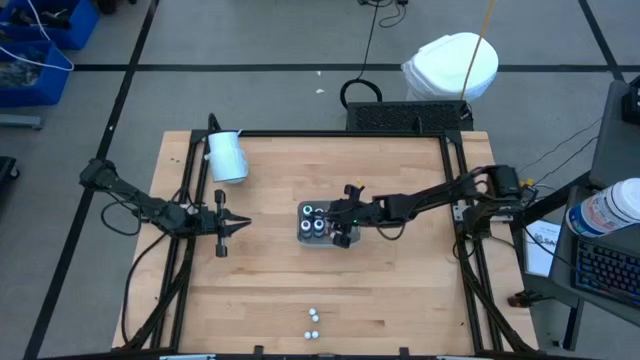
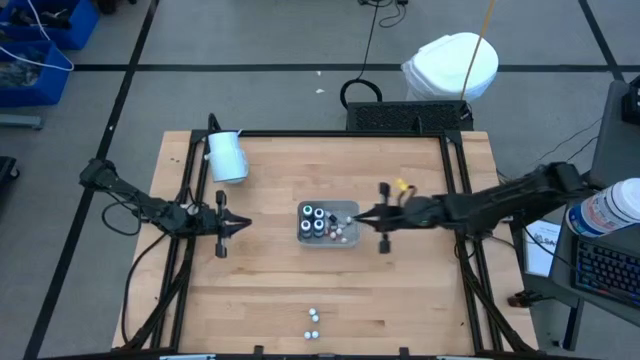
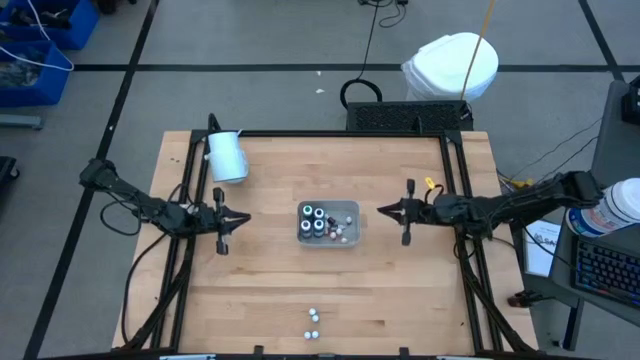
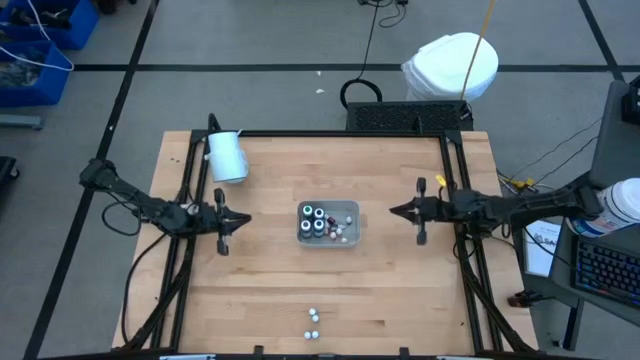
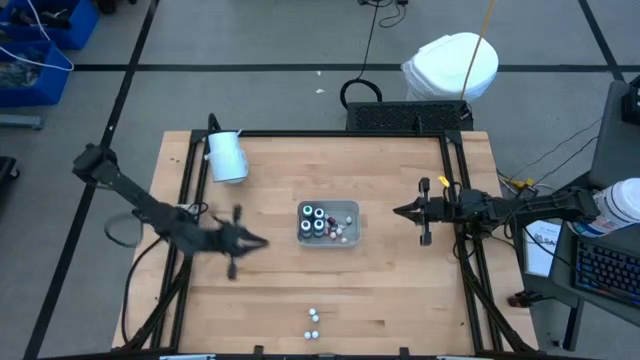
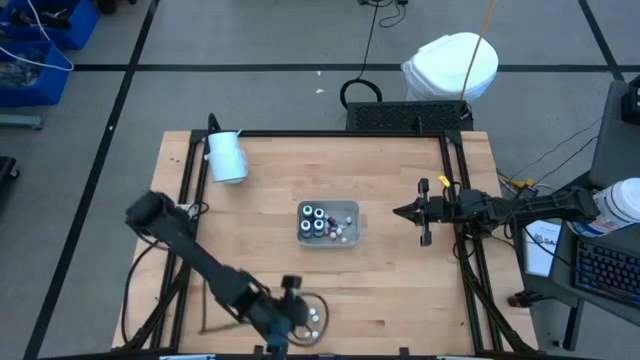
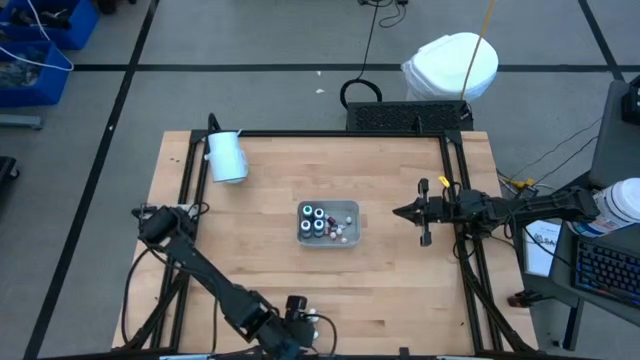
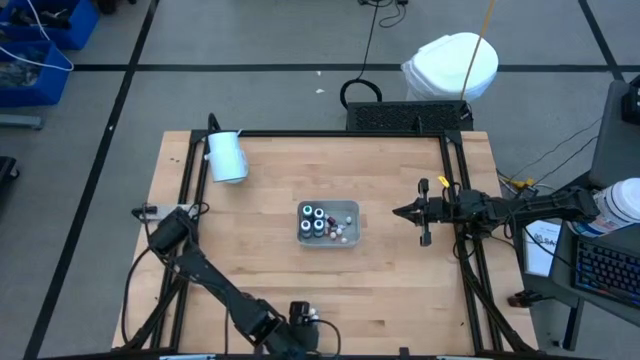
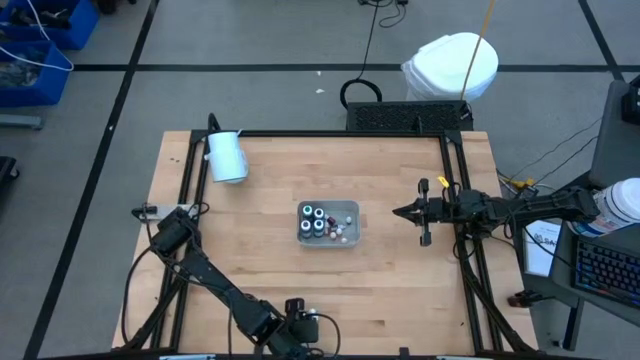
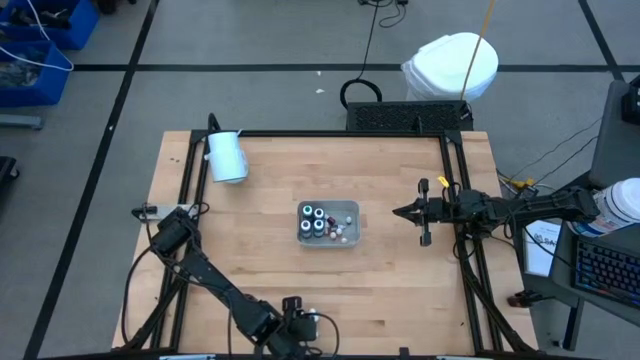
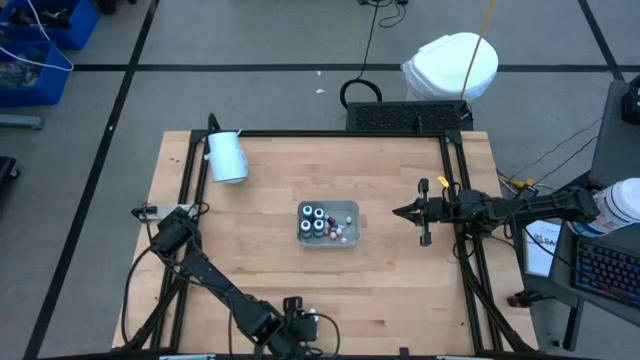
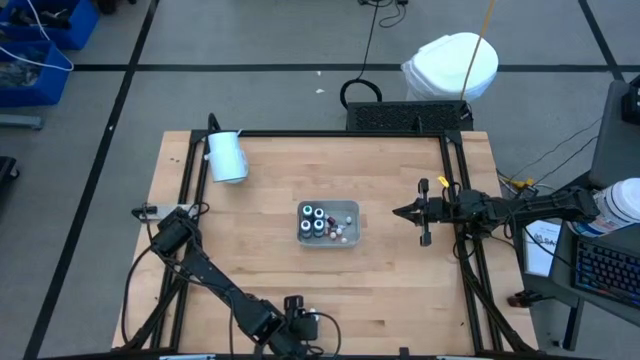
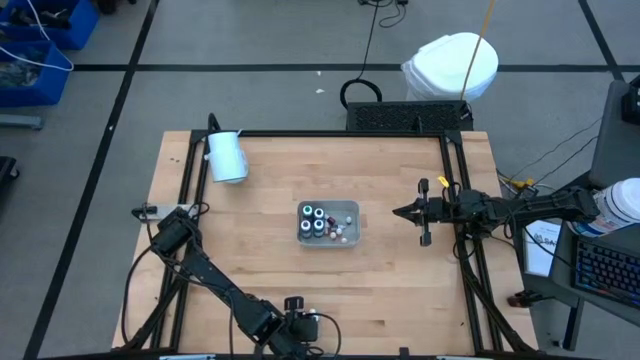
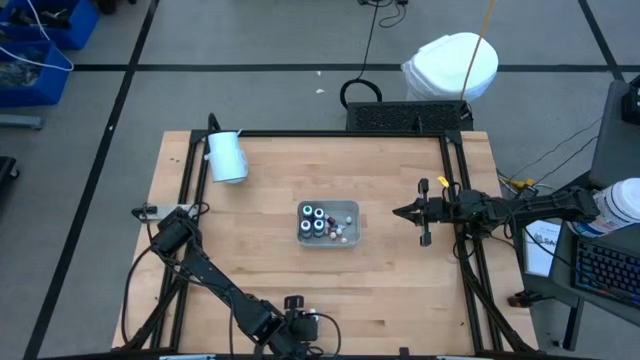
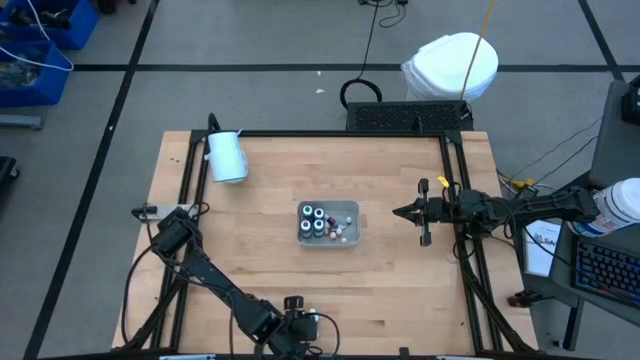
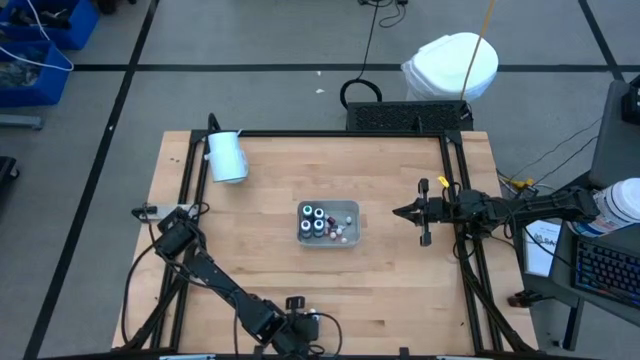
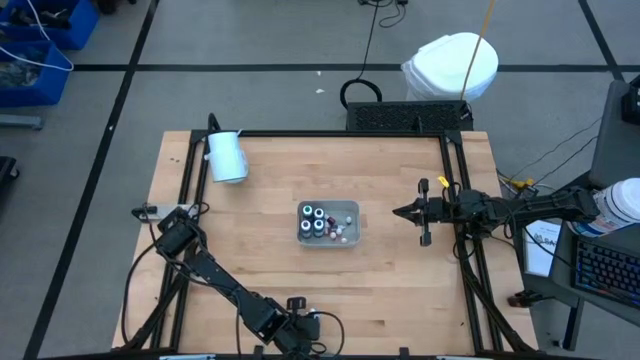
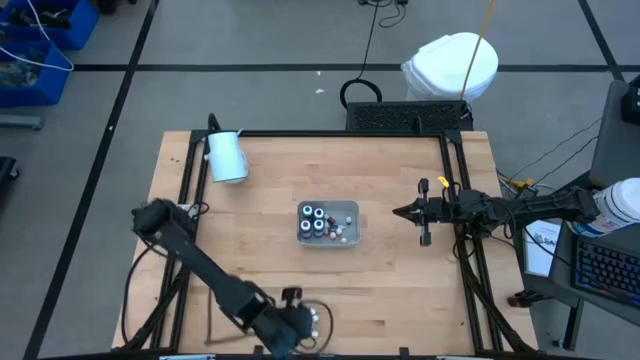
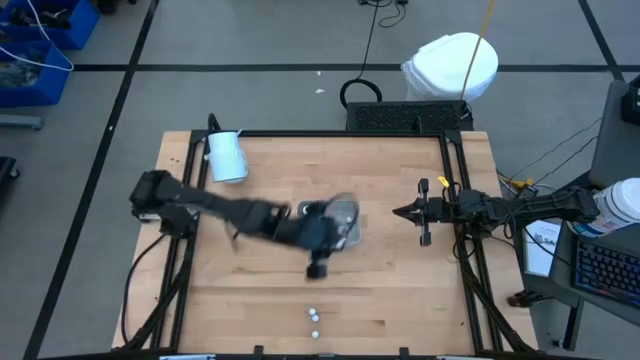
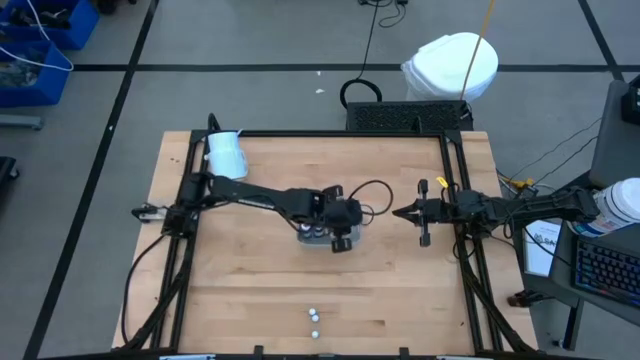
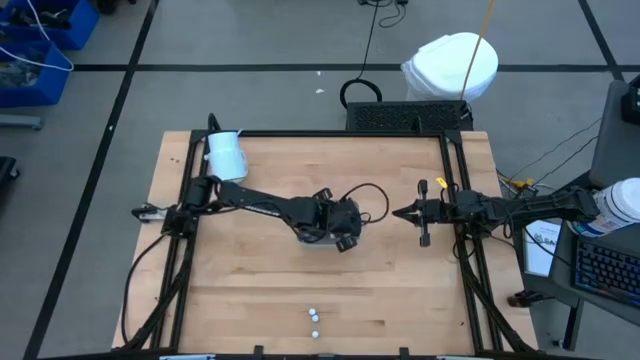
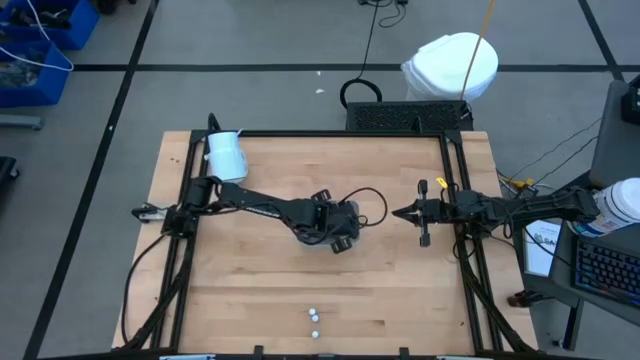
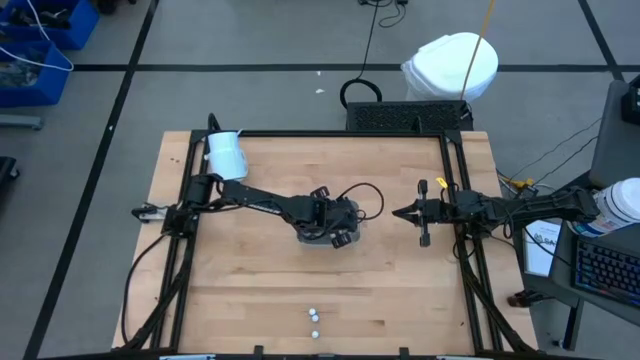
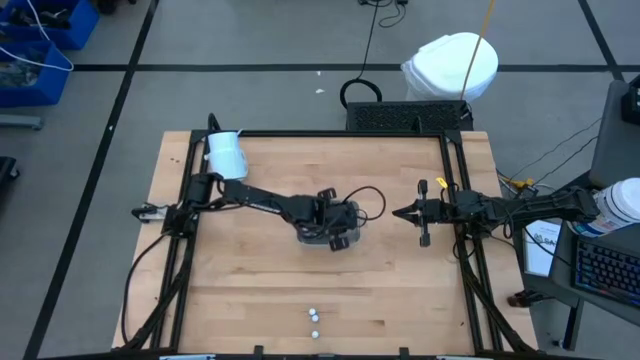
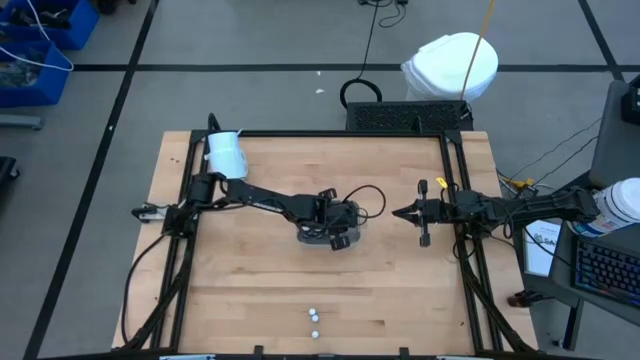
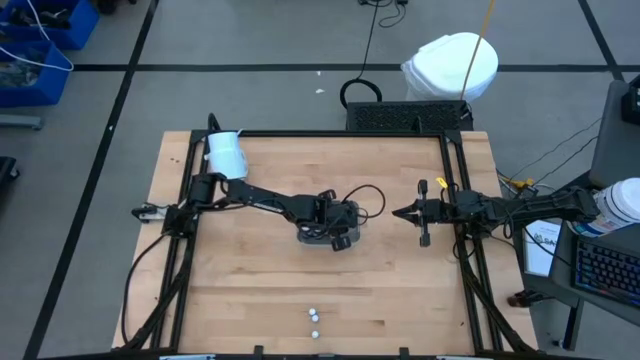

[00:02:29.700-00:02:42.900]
Task: Pick & Place food coloring
Put the small red food coloring bottle into the gray bin

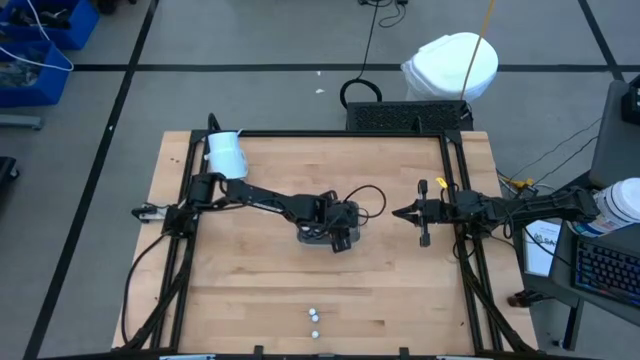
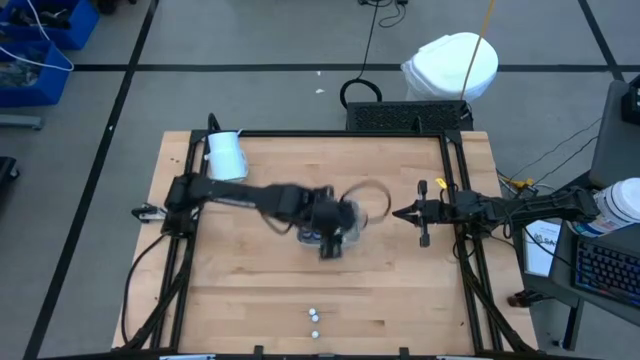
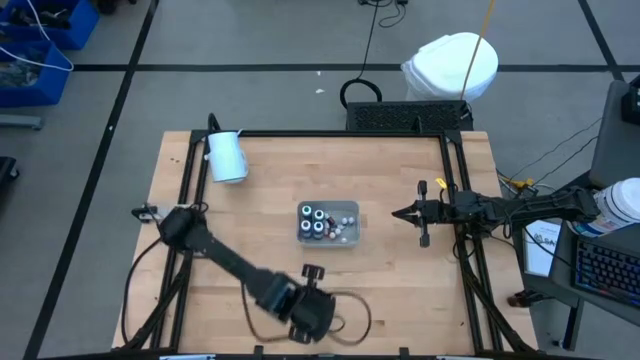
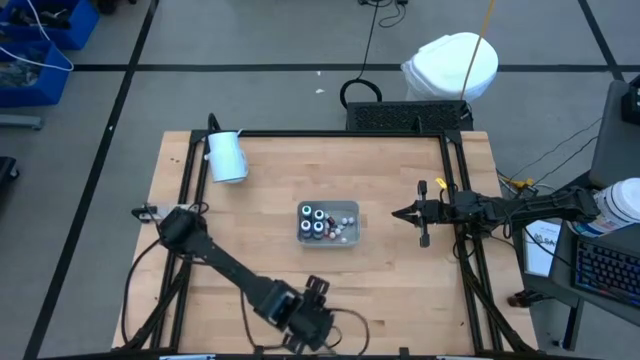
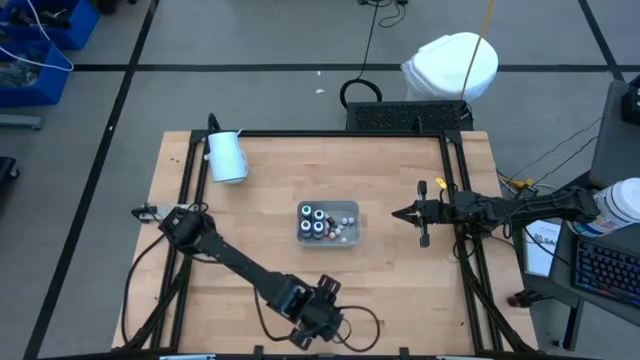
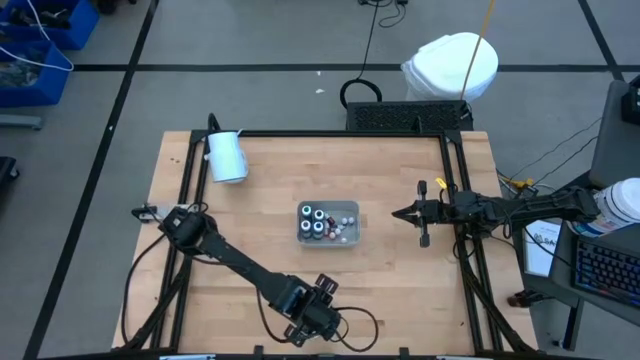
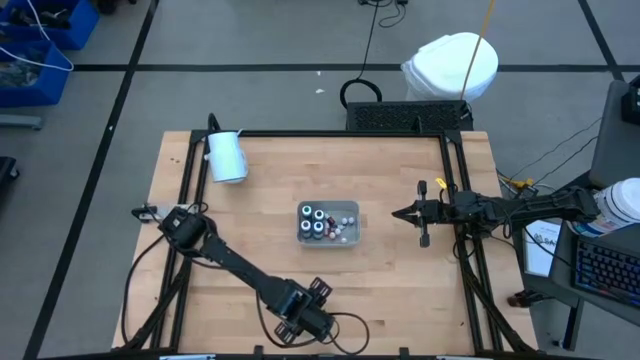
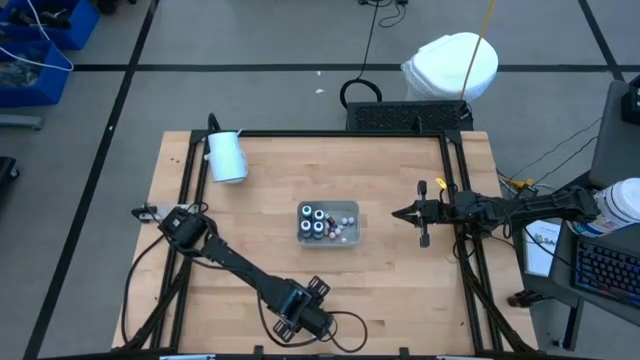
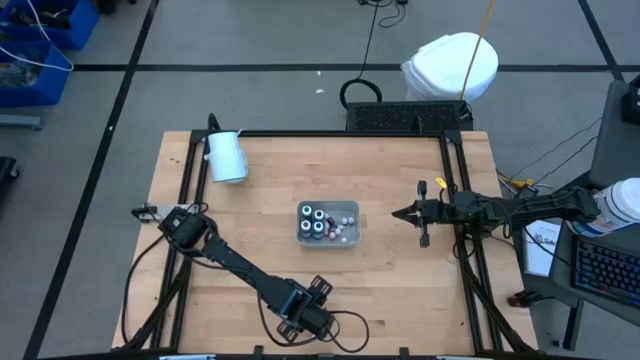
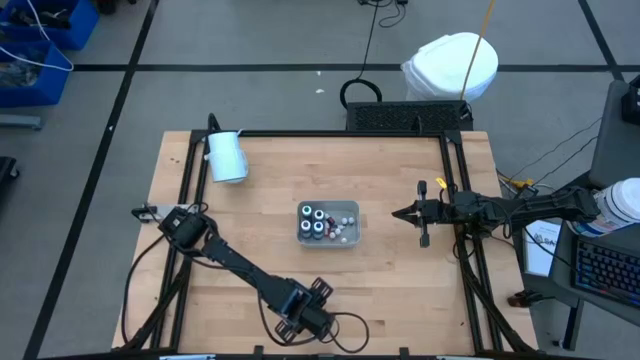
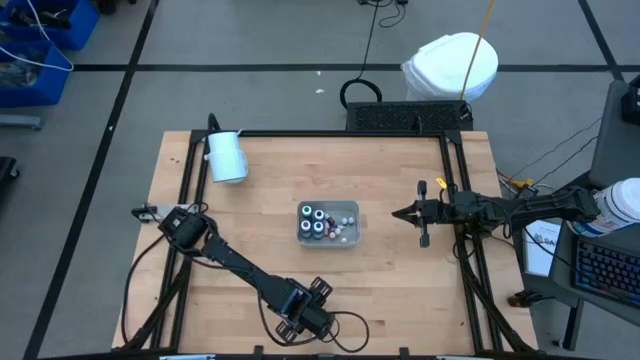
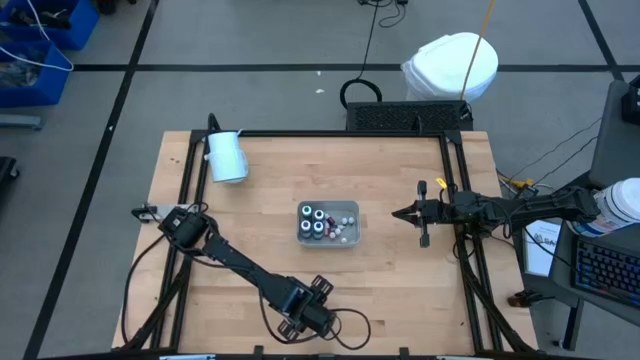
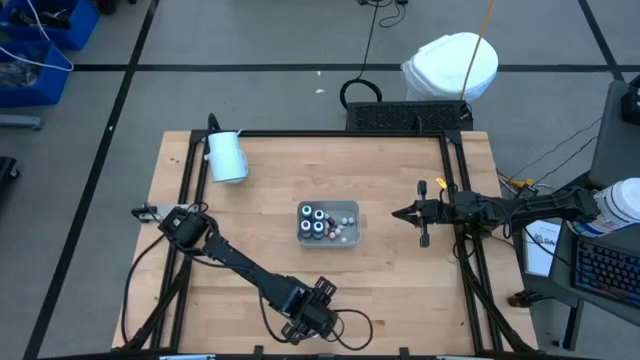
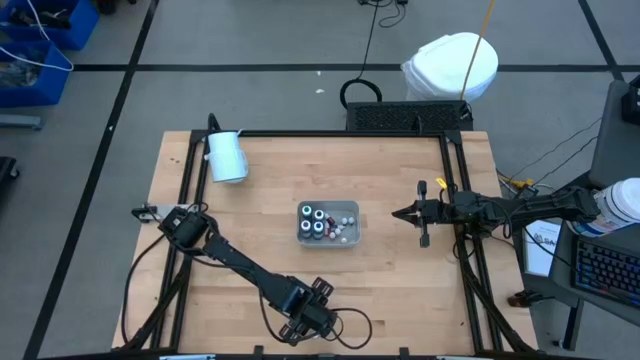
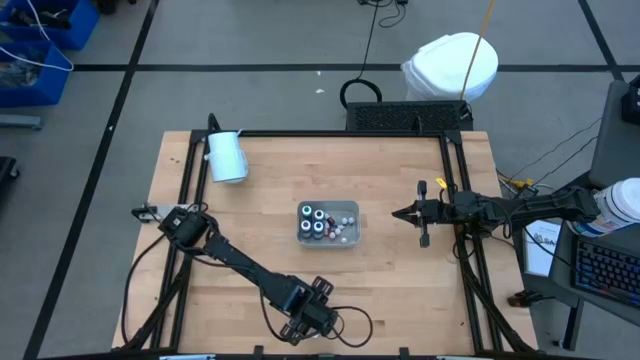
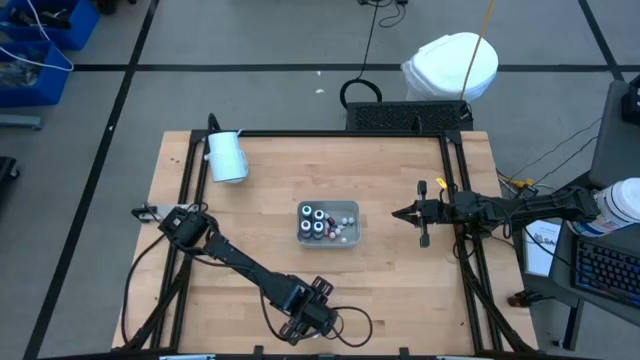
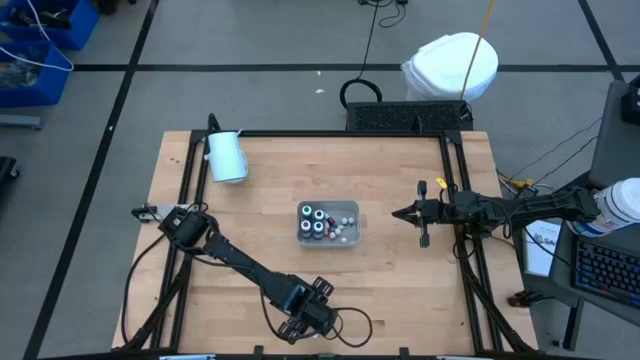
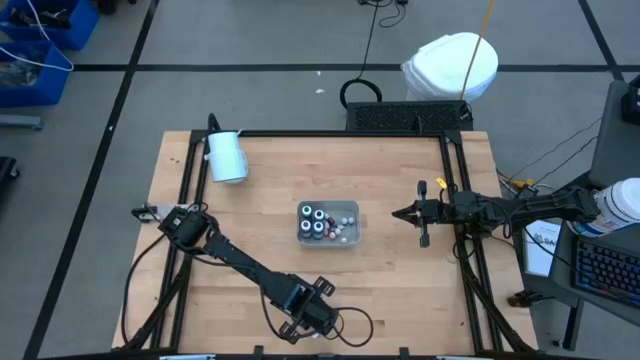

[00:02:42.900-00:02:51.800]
Put the small violet food coloring bottle into the gray bin
